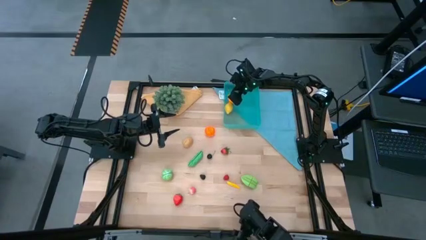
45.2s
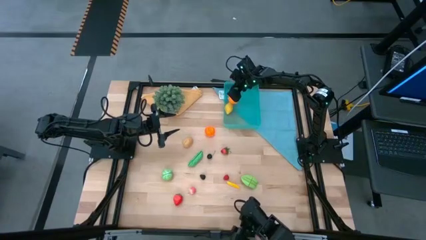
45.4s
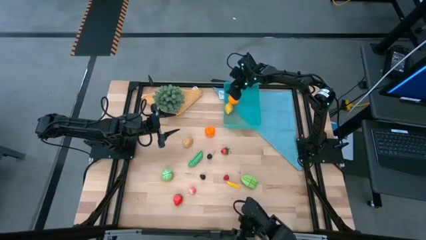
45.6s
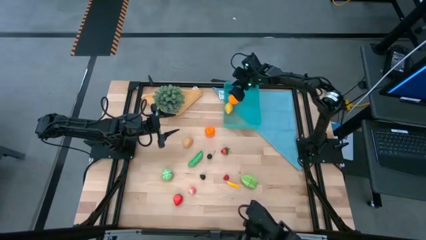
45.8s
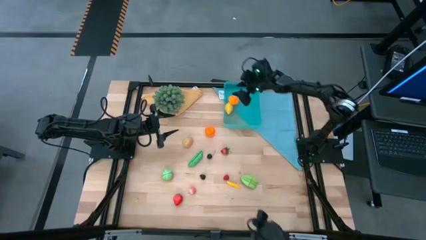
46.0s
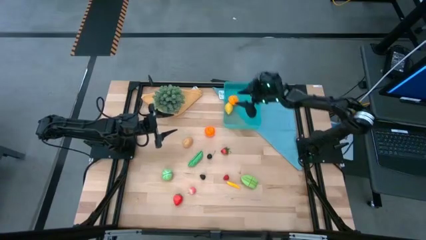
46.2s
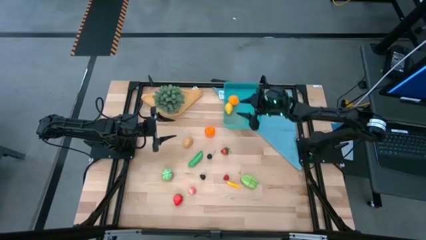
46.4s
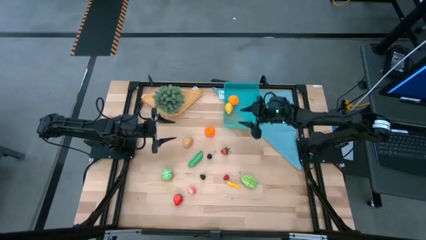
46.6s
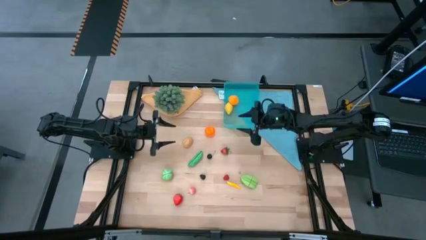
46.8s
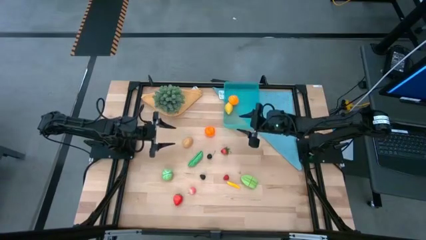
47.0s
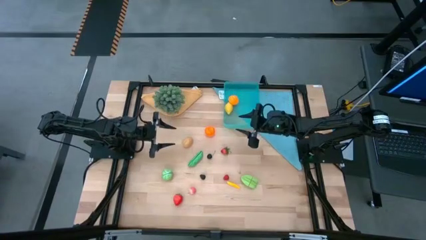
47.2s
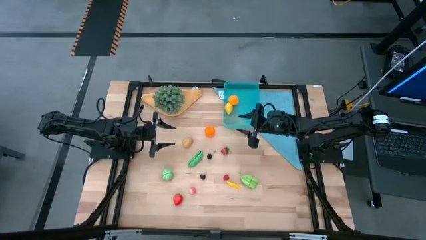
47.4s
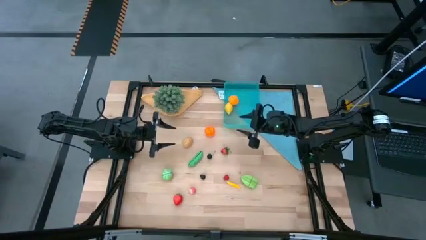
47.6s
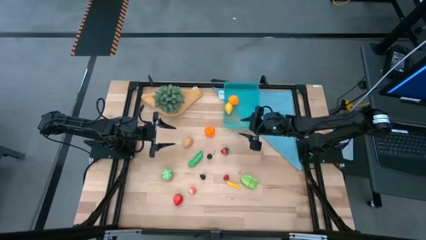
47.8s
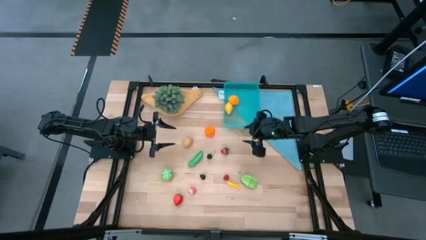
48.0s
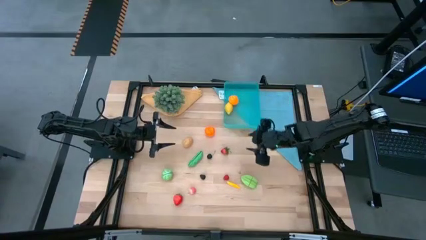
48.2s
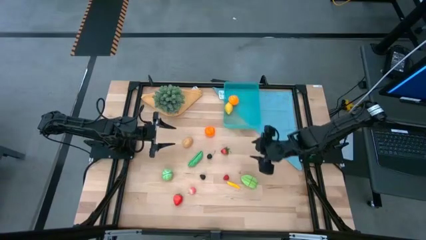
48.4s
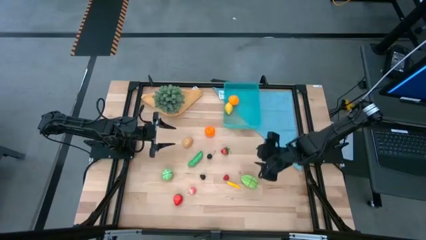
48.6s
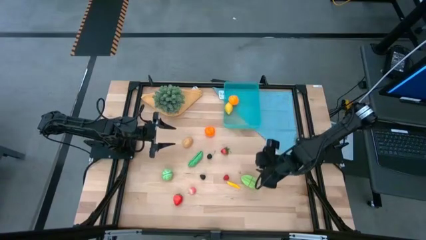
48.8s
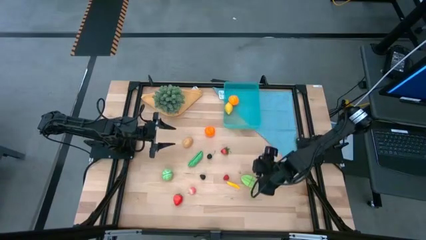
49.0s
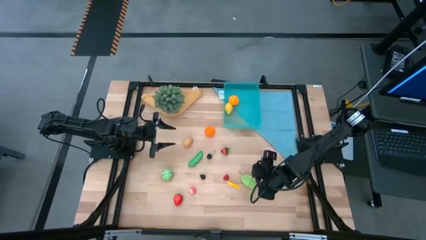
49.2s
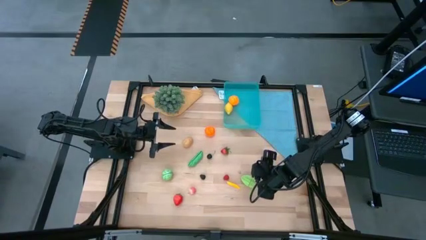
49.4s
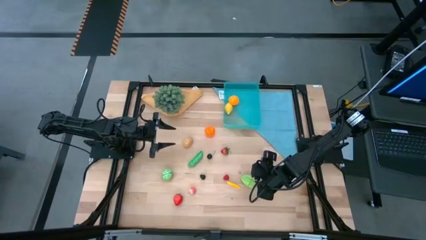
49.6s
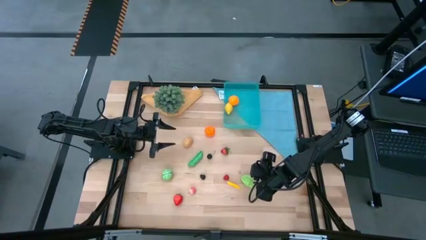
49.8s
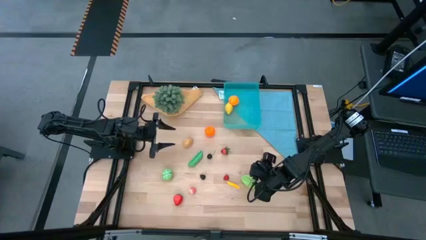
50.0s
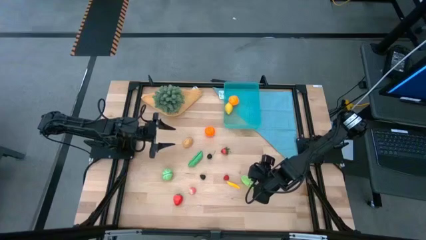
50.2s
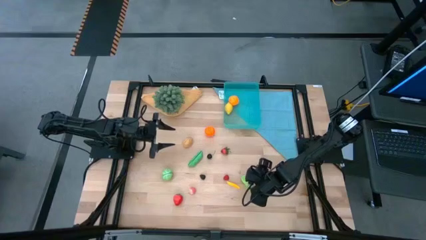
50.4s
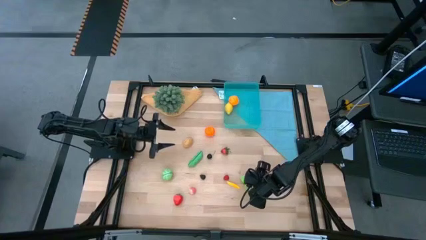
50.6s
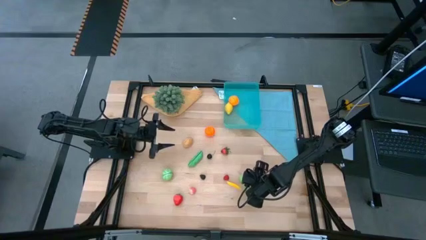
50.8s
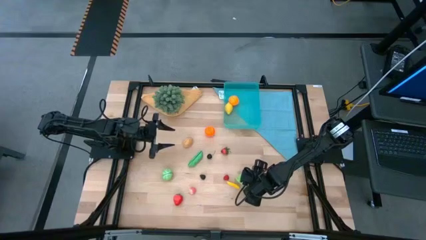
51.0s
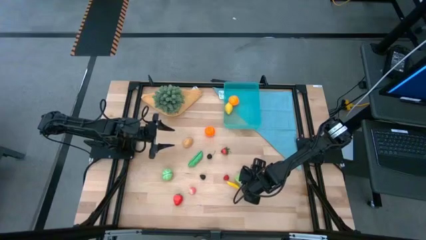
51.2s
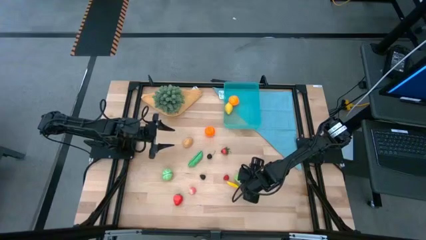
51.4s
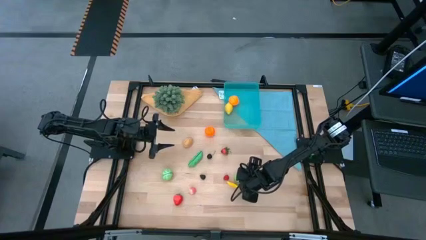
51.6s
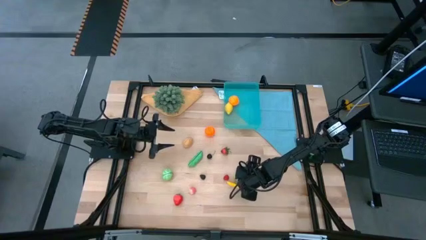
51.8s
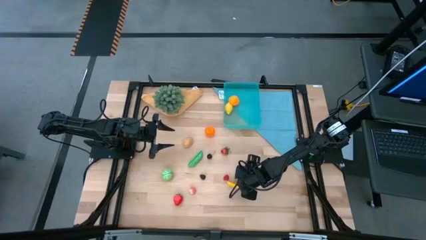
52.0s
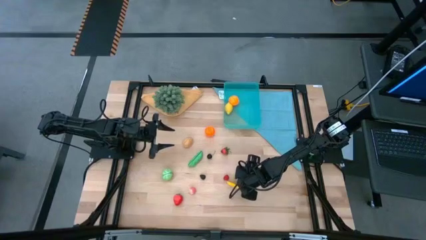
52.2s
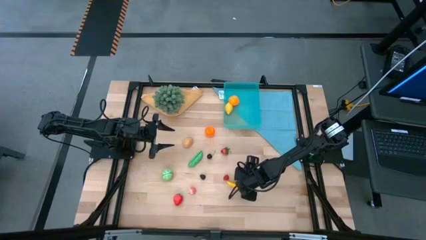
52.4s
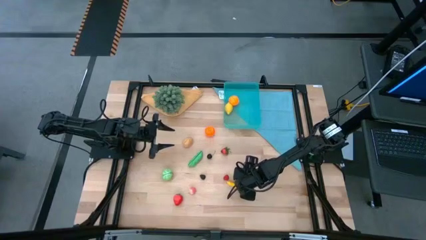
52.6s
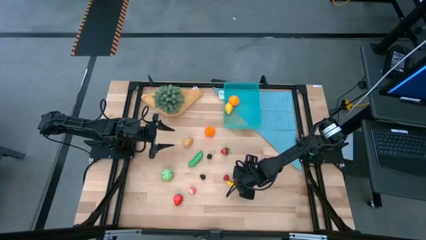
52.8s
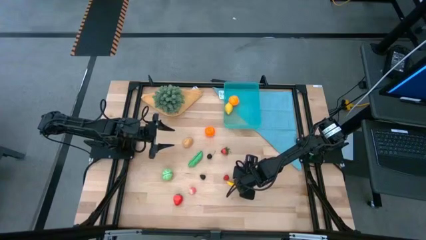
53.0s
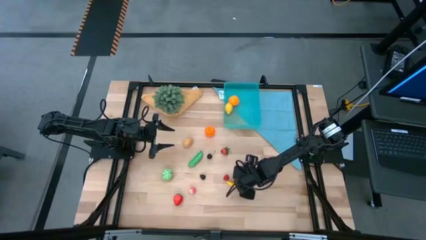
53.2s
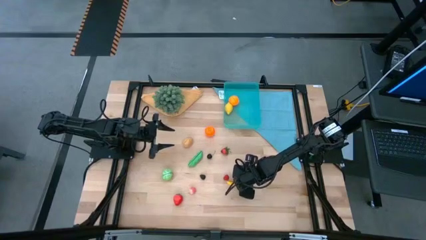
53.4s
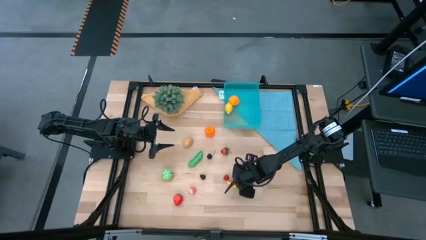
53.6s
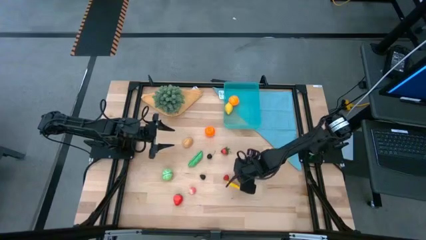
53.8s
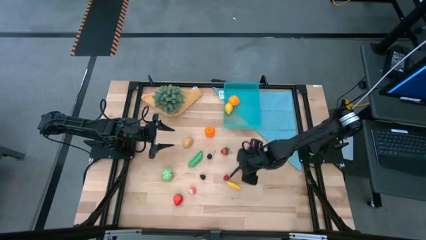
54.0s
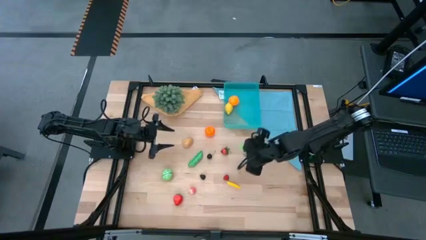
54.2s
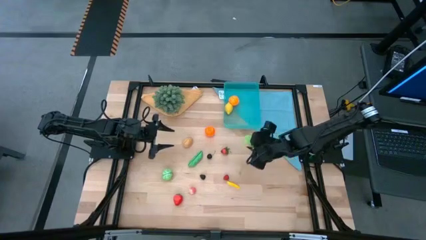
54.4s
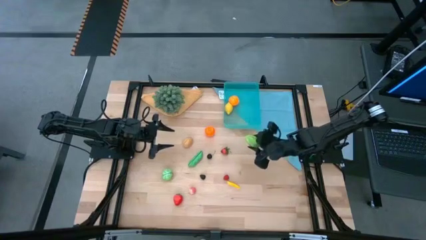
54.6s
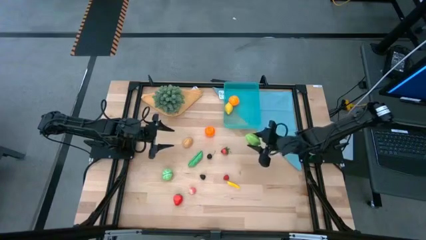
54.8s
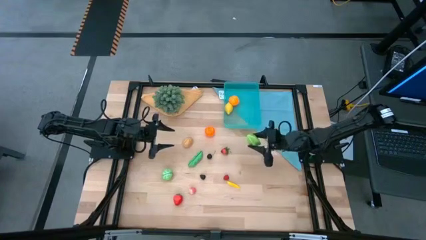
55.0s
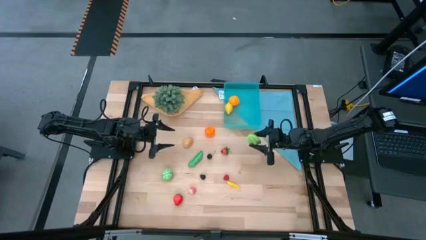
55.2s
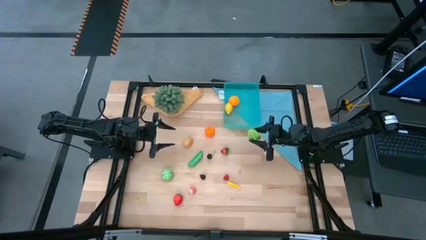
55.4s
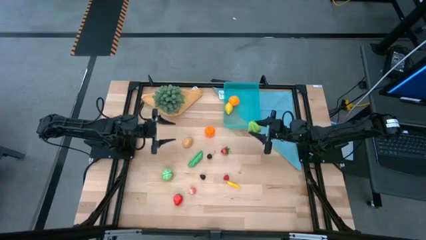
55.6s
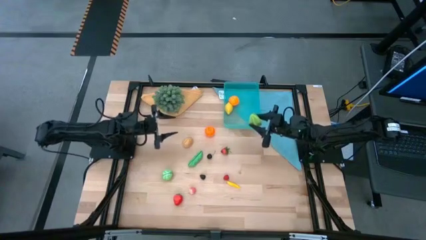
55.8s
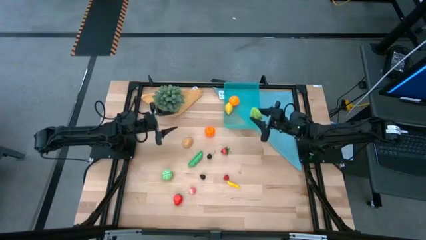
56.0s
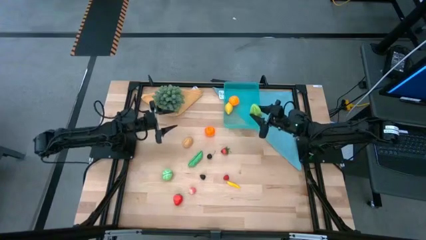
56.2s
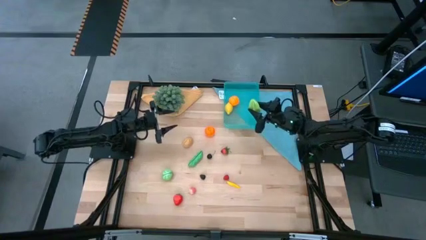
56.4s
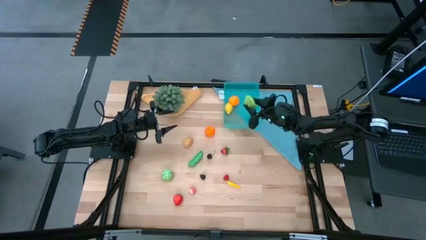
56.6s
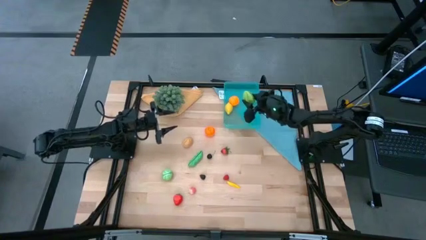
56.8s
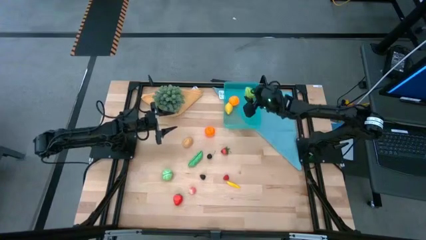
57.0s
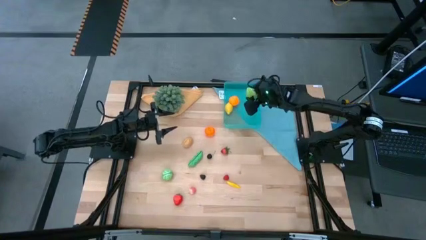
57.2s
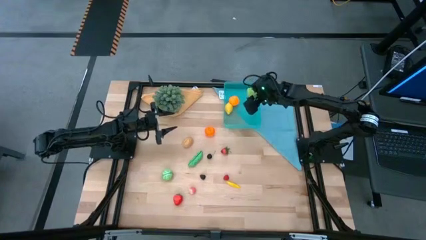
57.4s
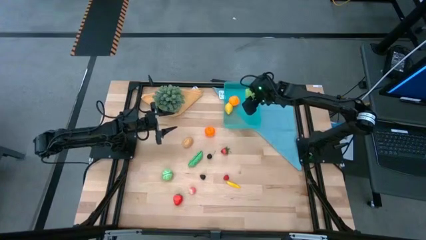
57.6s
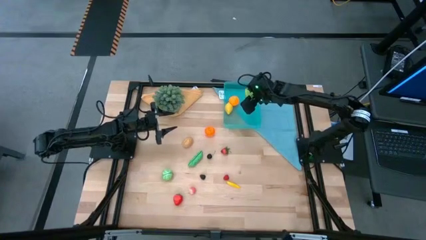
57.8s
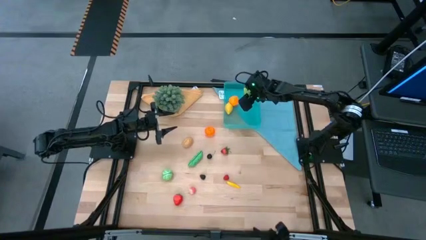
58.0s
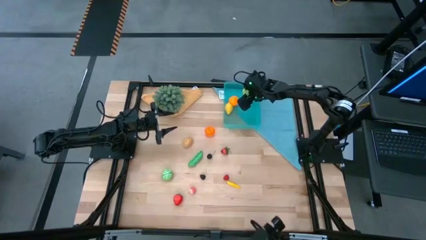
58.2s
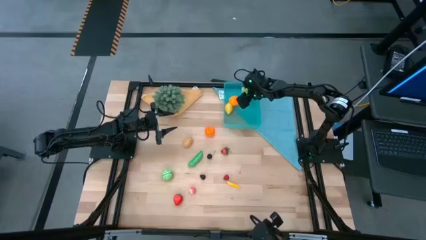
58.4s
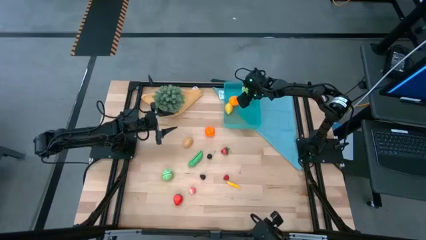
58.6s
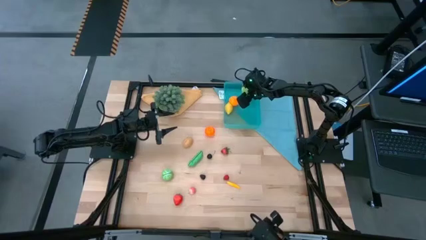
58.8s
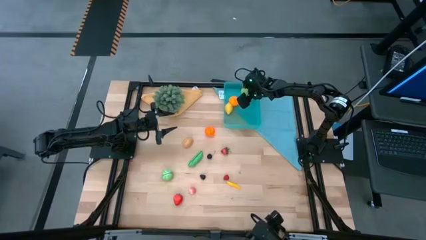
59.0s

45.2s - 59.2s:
Task: Pick and placing Produce into tupperware
Put the green starfruit into the blue bin

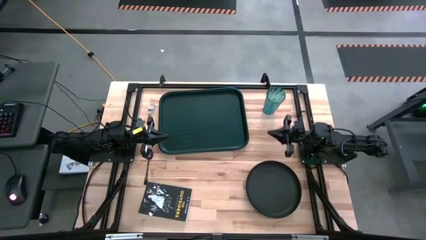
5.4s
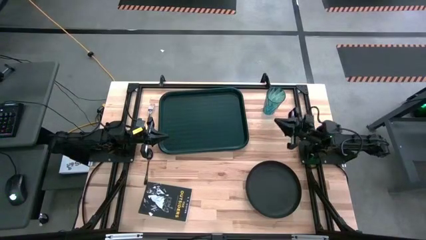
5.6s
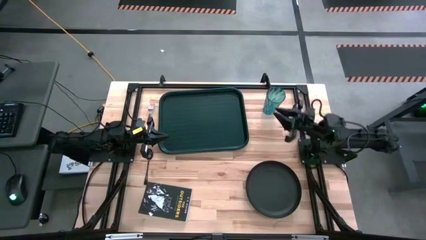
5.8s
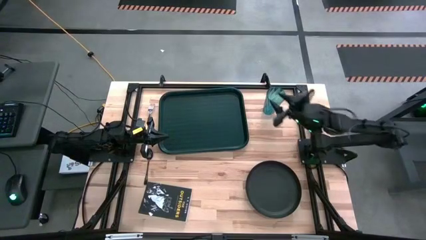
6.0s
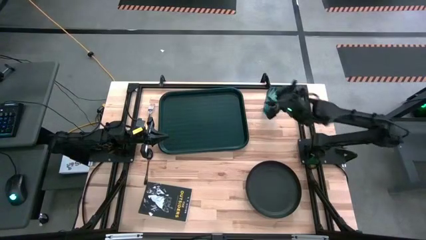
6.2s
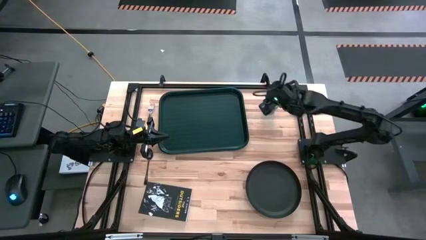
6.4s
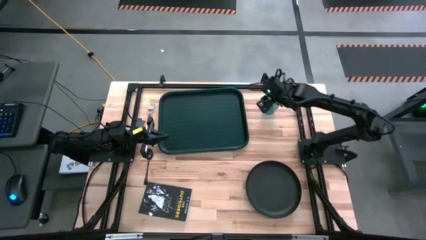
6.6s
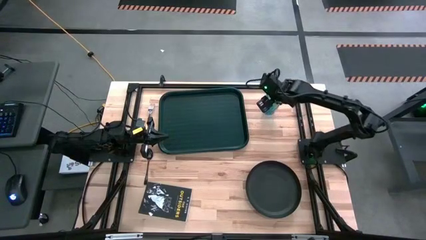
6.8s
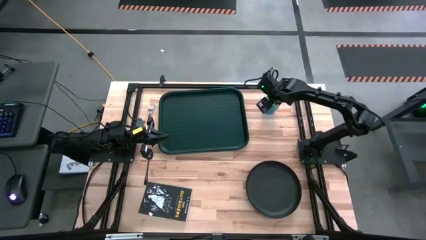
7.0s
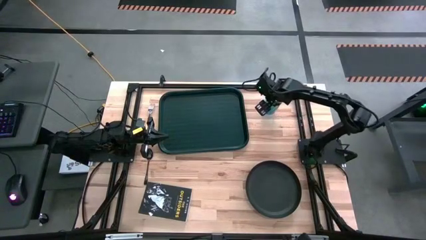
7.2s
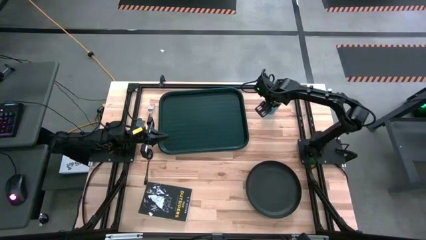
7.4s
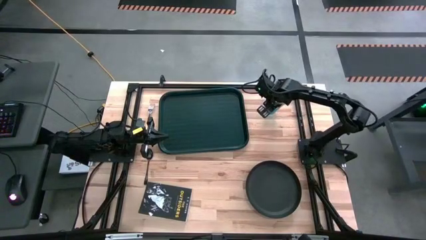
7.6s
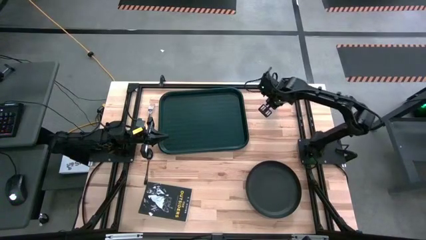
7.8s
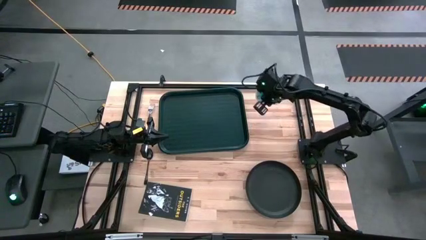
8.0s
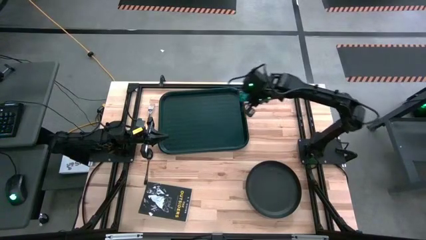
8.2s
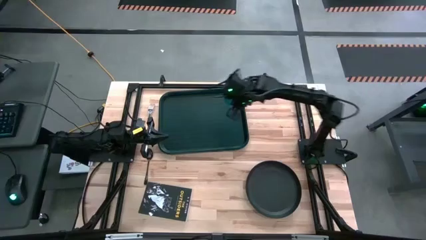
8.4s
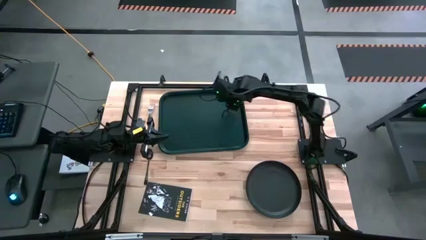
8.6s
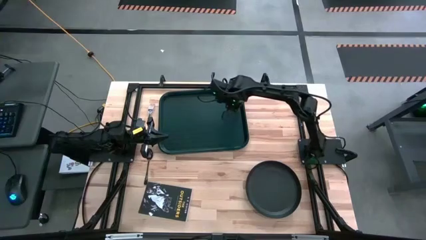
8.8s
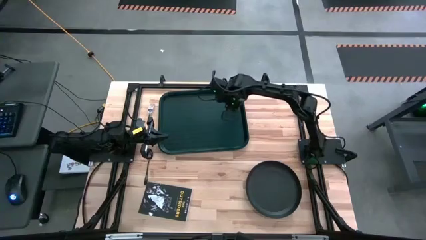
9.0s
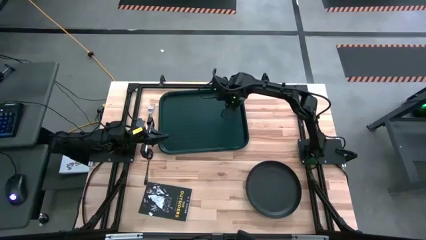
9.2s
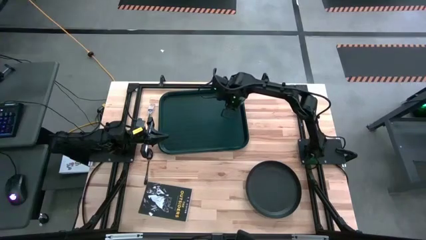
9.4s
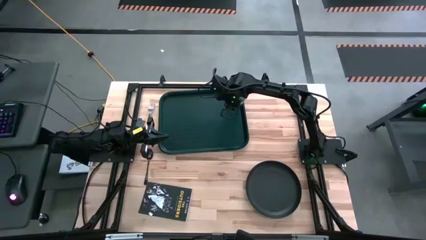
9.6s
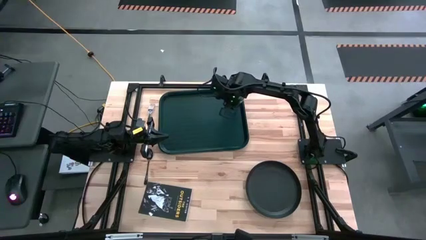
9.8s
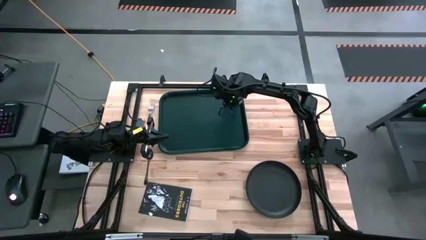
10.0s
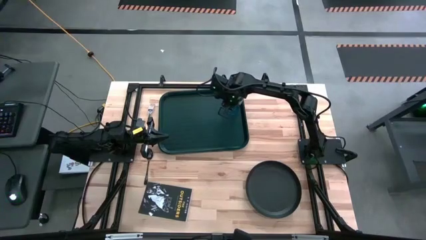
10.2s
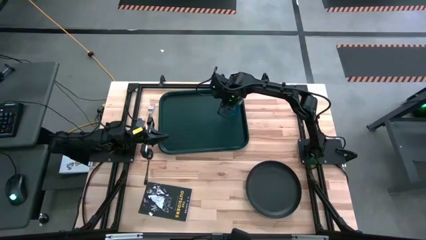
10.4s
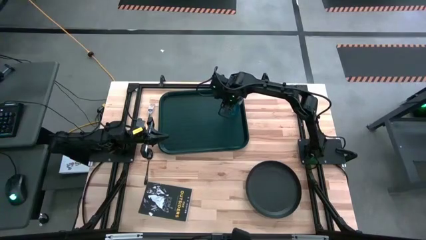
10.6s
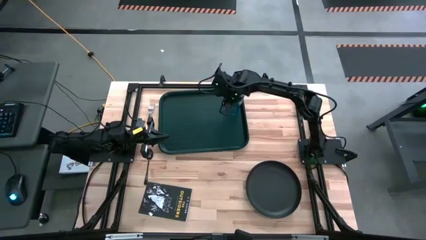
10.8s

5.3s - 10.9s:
Task: Pick and place plate/cup/fork/spoon on tray
Put the blue cup on the top right of the black tray
